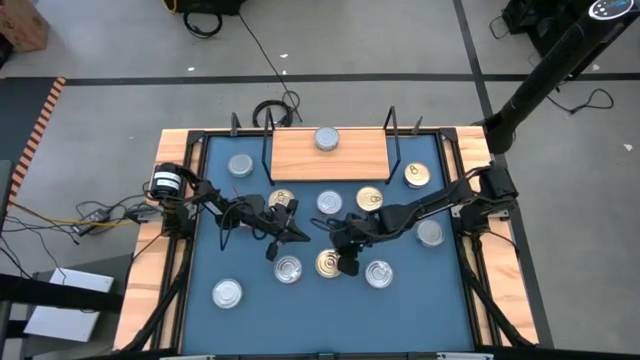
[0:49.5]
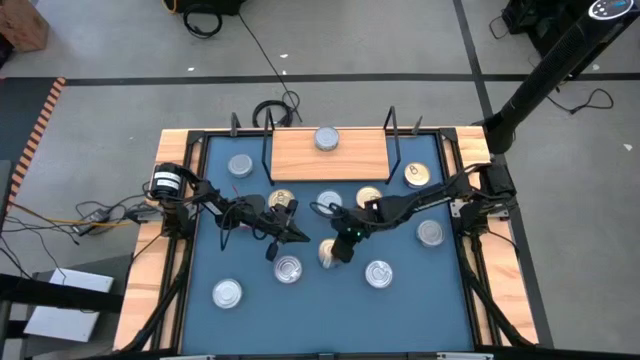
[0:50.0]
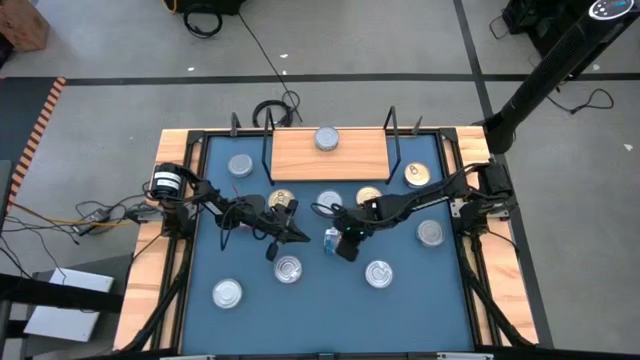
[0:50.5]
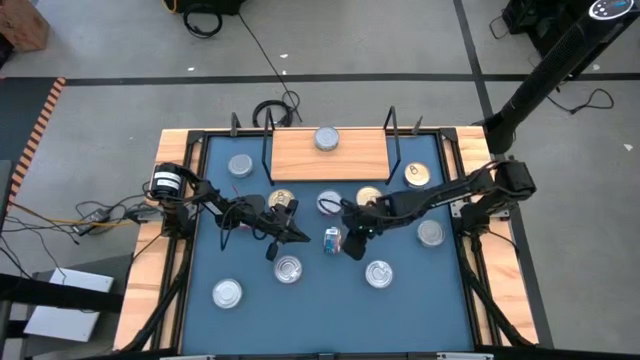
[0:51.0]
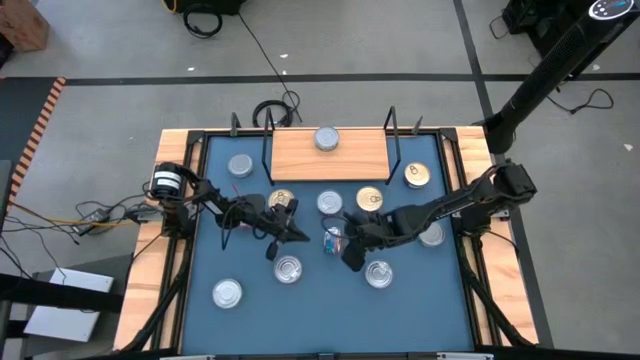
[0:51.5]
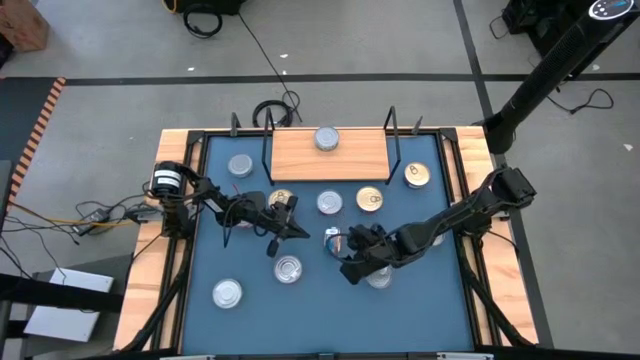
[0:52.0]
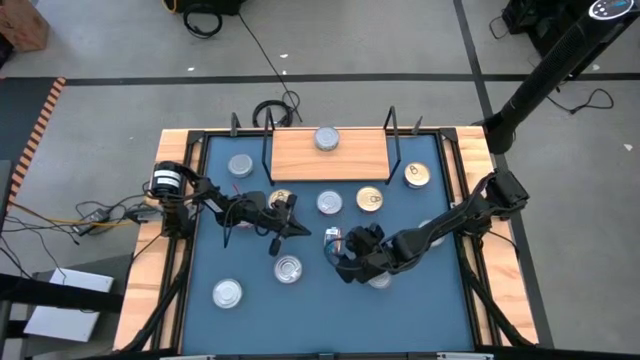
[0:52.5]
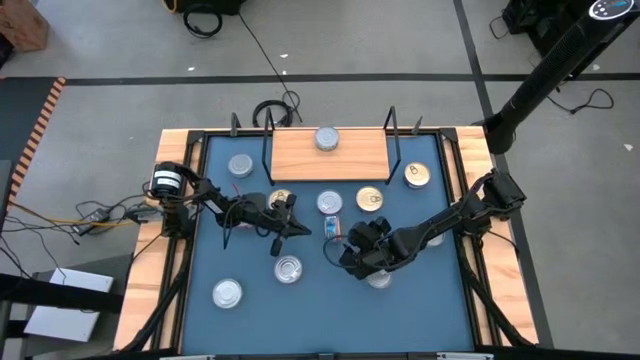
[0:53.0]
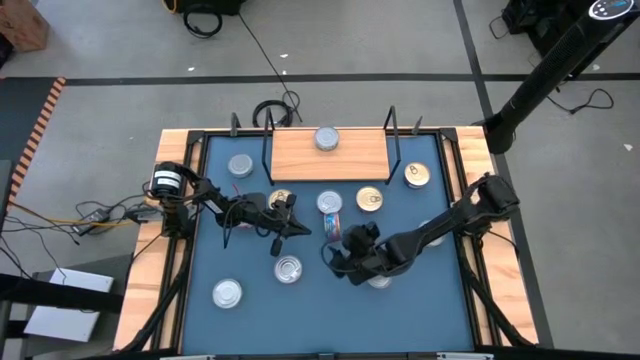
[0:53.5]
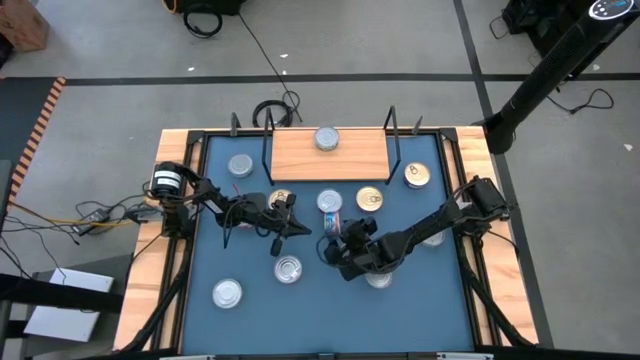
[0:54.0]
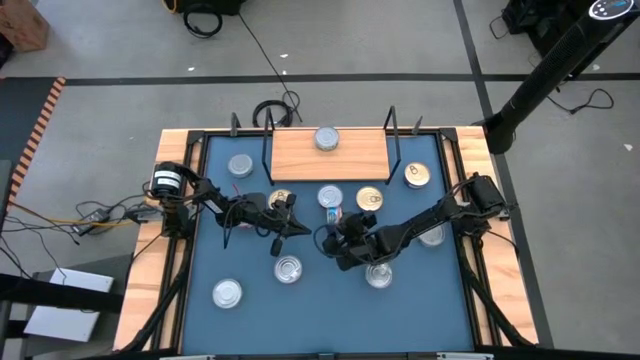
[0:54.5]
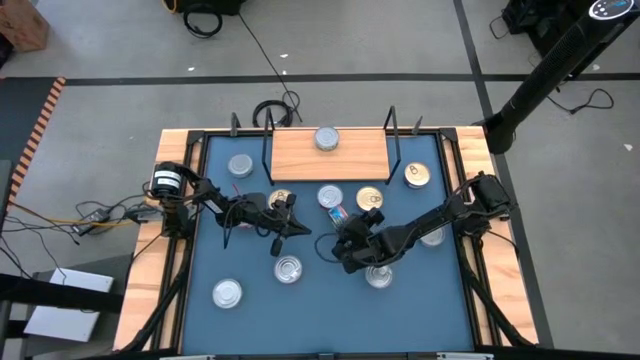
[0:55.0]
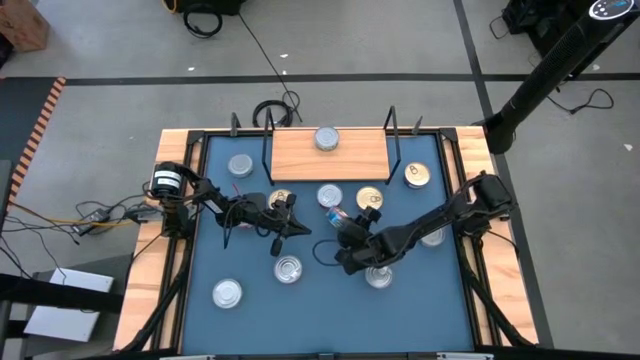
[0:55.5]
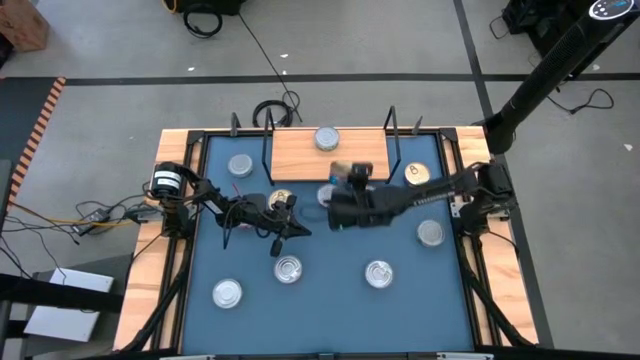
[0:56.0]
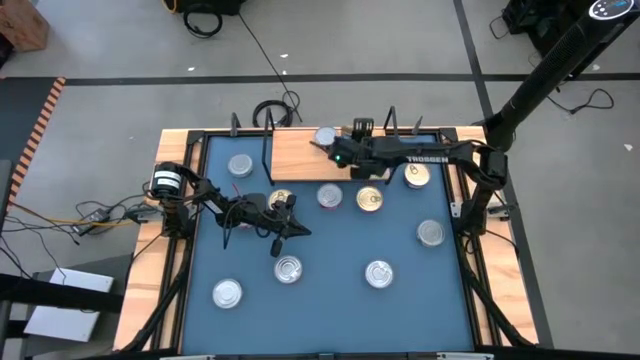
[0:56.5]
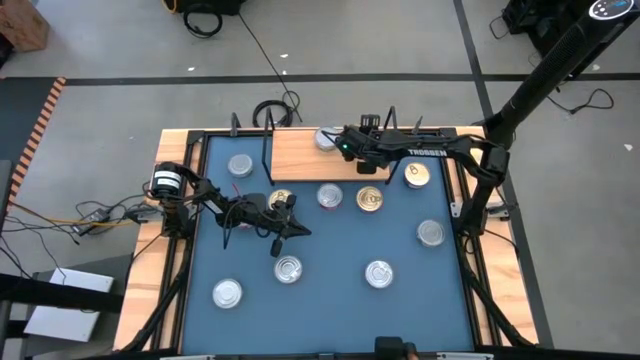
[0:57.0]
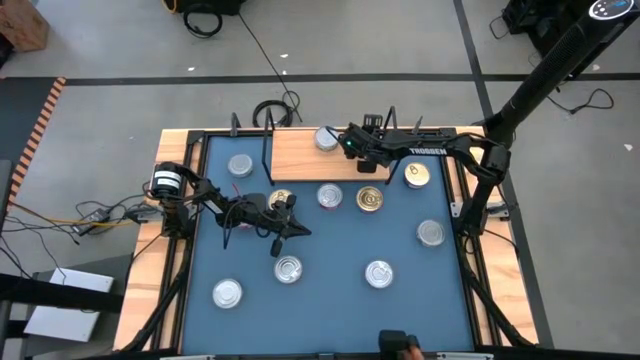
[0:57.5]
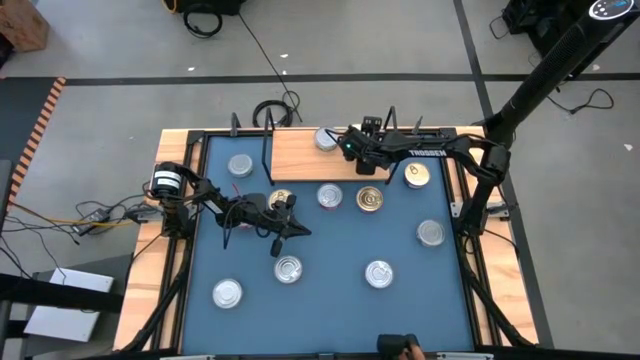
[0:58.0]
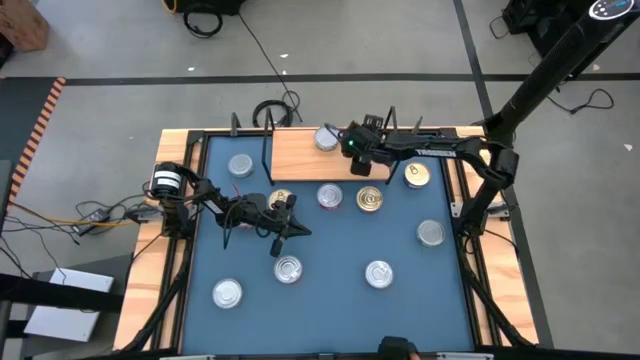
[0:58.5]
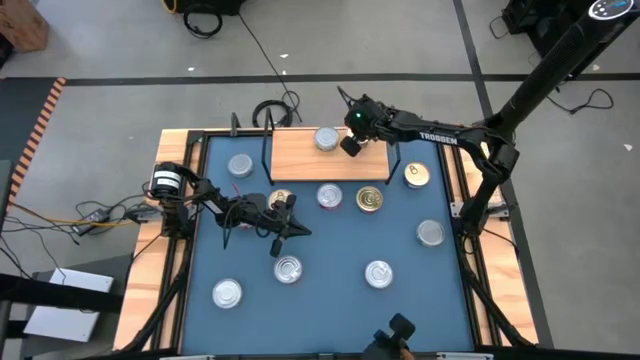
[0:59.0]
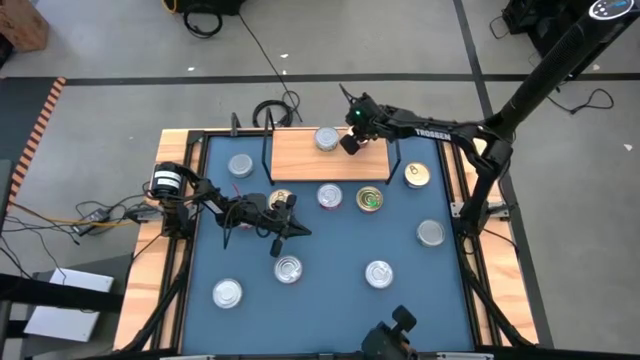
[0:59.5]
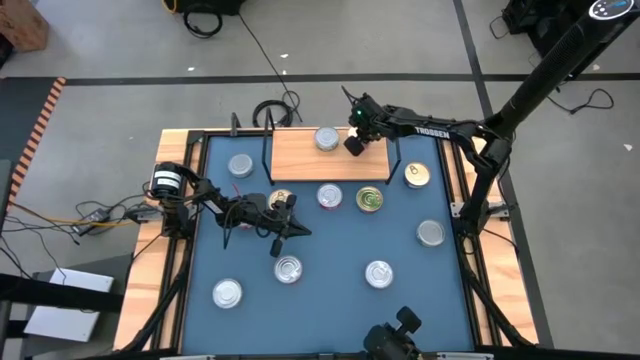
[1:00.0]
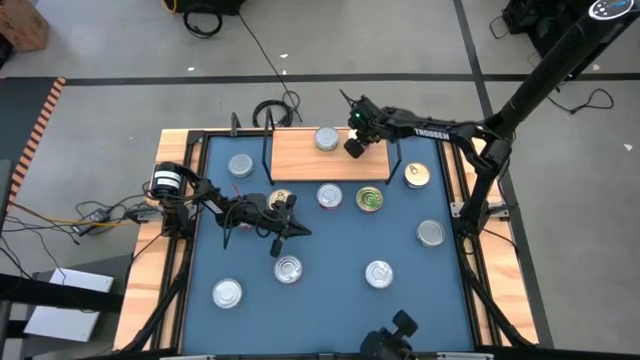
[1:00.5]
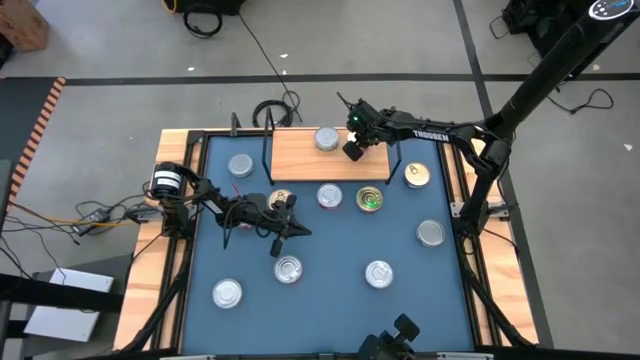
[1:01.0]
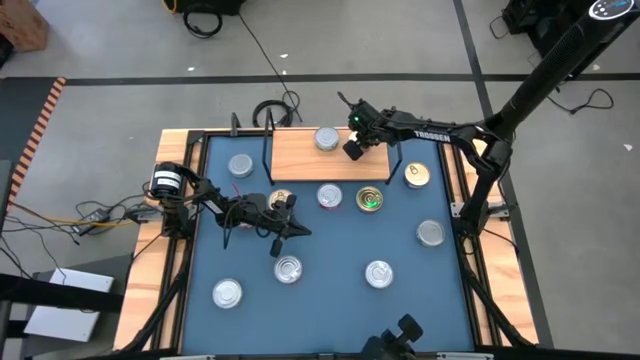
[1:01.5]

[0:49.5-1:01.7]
Task: Stack canned seafood by type on shelf
Put the blue tuna can on the shelf

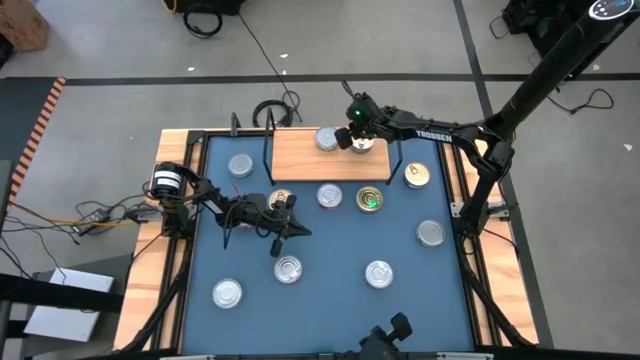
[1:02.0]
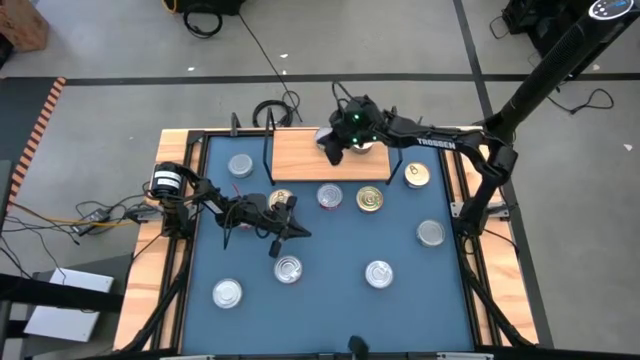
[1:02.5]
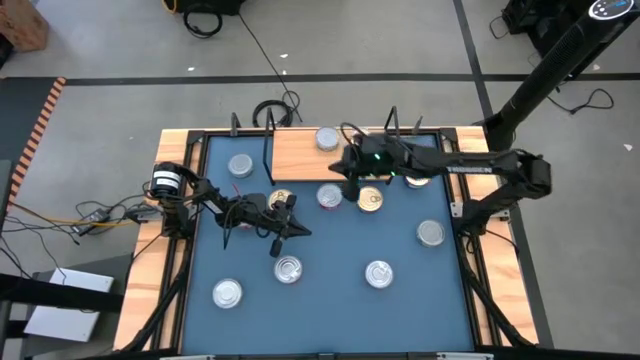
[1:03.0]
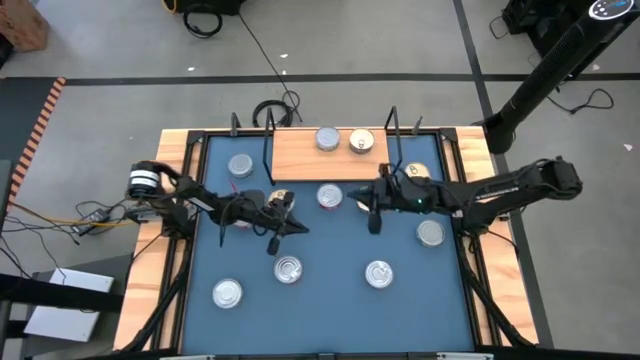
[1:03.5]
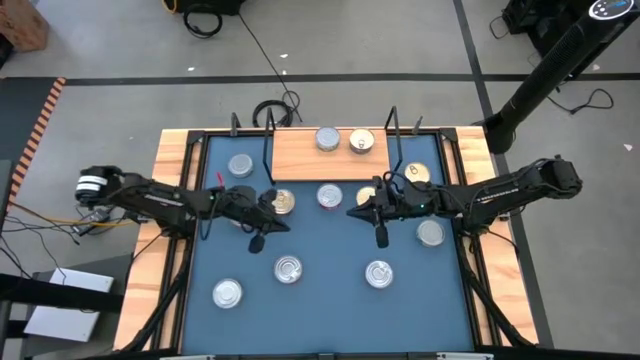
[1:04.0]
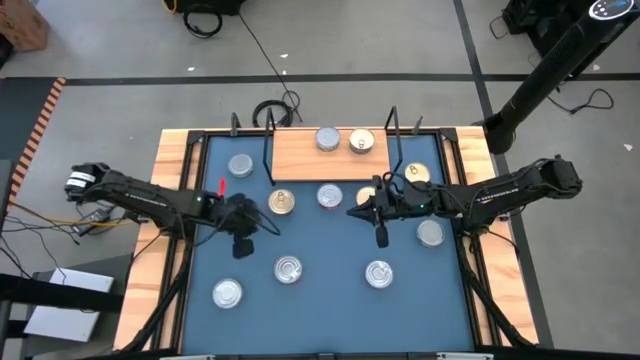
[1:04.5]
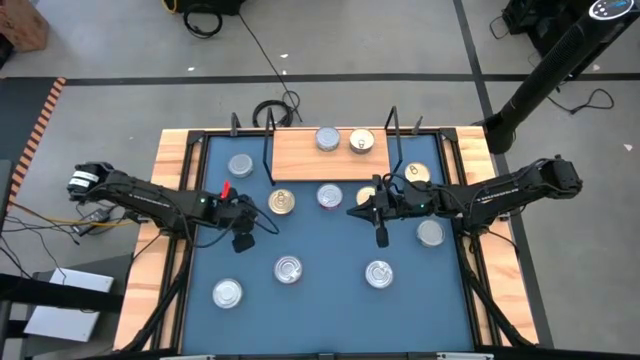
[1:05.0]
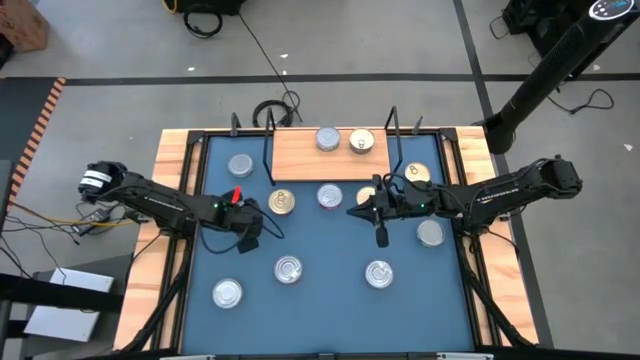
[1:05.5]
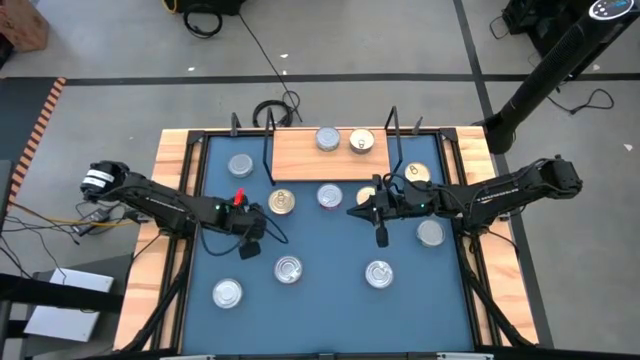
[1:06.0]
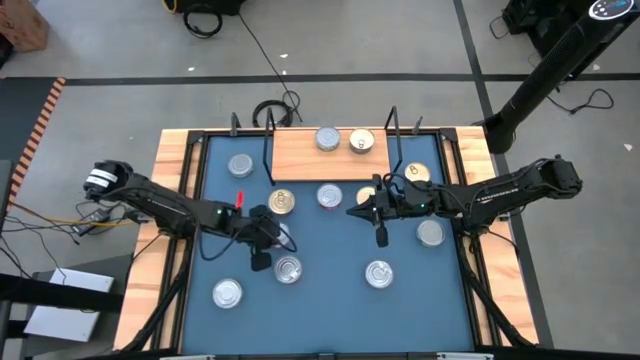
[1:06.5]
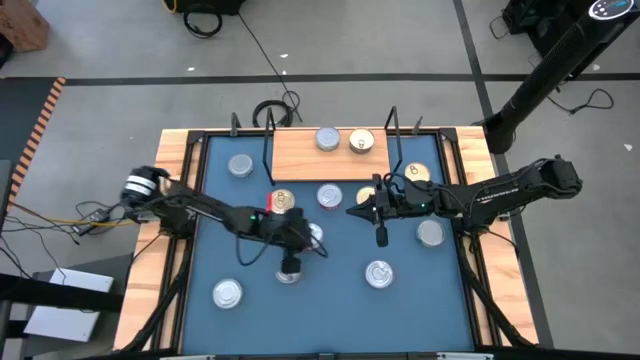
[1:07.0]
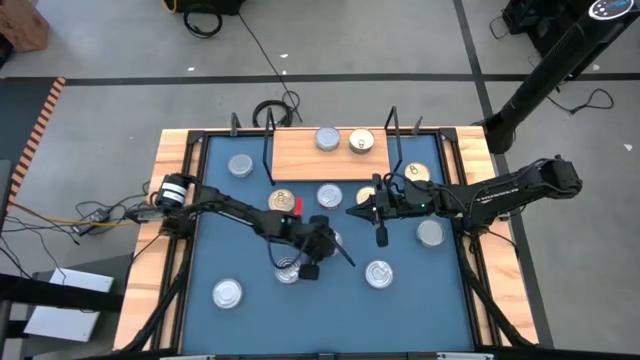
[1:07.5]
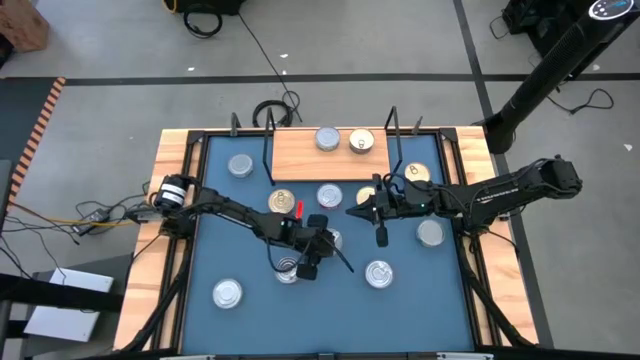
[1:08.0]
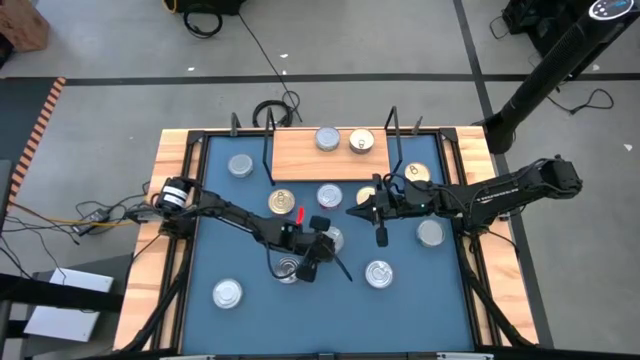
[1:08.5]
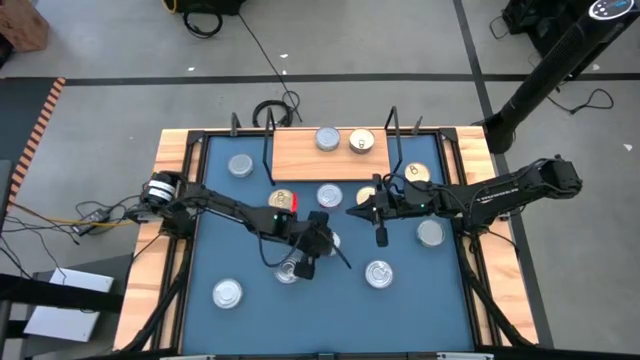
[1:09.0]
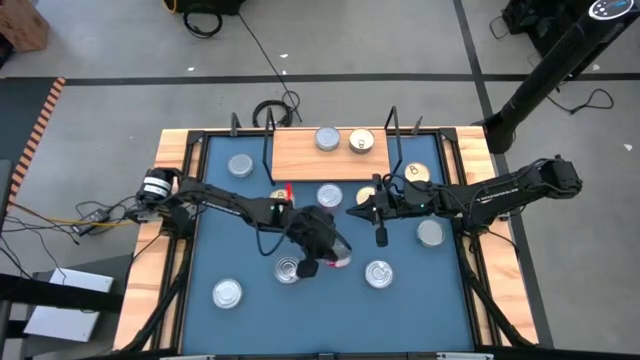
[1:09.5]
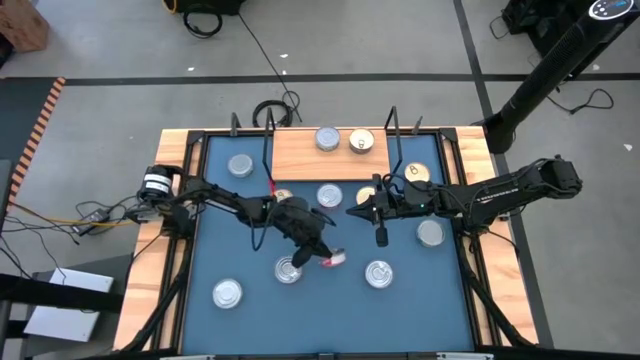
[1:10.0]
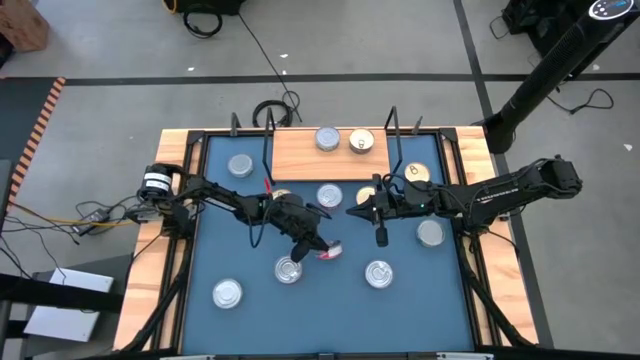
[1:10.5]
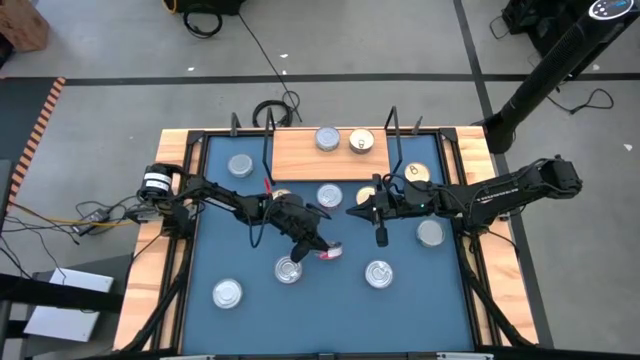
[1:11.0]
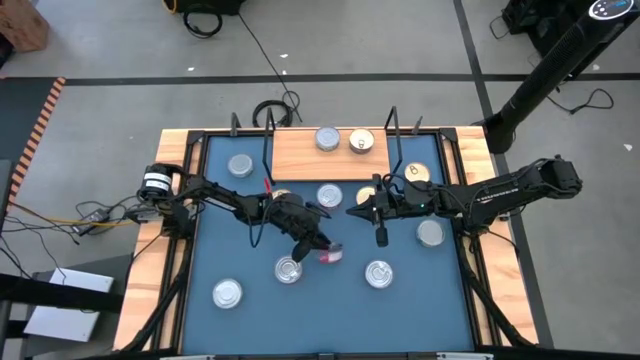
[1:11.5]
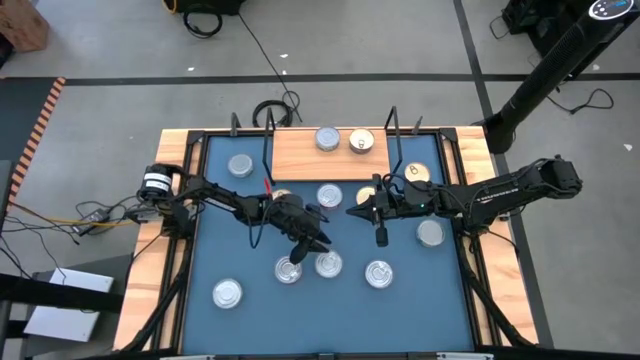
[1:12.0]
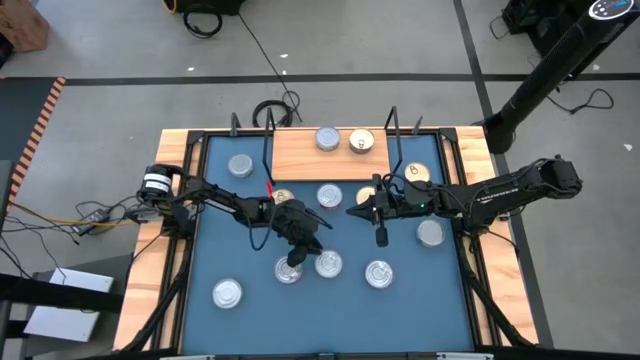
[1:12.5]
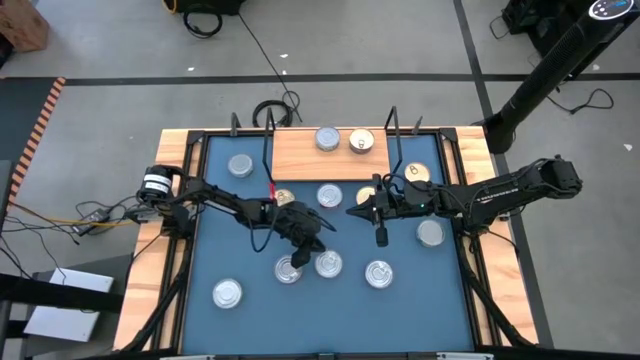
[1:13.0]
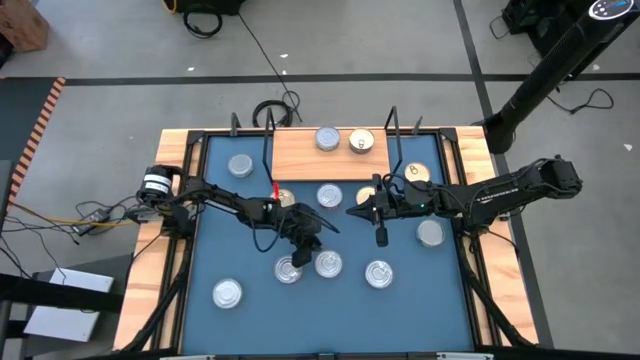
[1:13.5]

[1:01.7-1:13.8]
Put the red tuna can on the shelf
